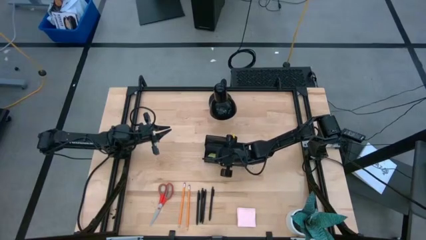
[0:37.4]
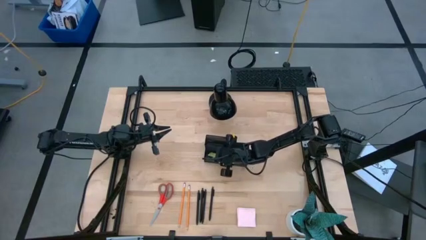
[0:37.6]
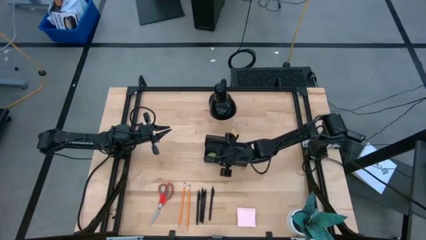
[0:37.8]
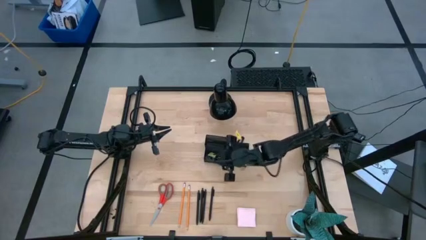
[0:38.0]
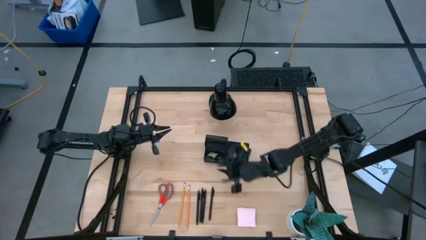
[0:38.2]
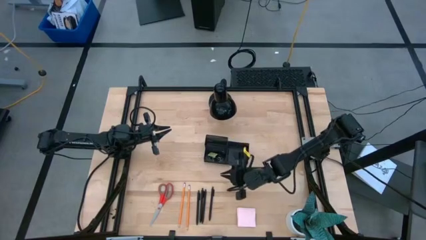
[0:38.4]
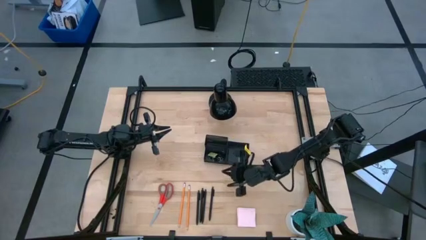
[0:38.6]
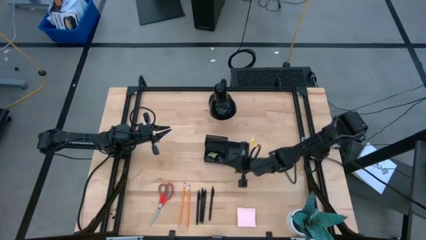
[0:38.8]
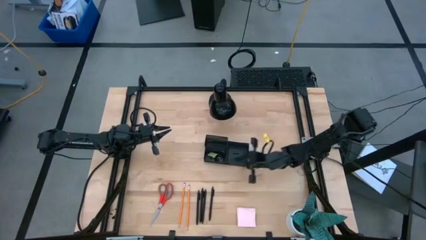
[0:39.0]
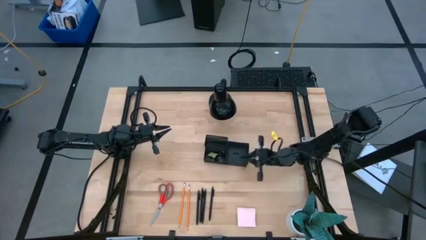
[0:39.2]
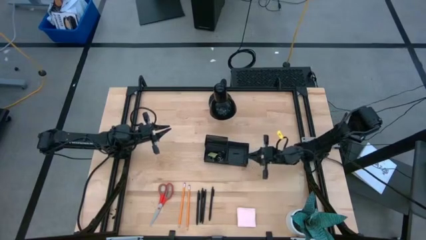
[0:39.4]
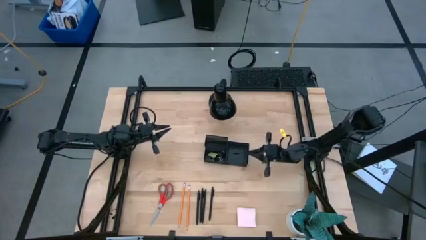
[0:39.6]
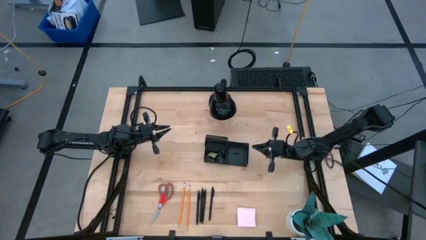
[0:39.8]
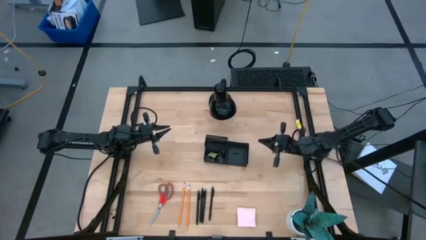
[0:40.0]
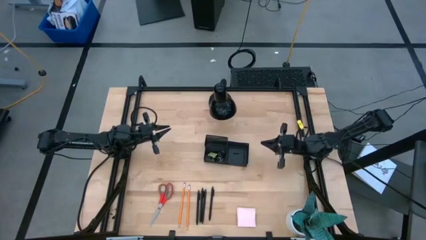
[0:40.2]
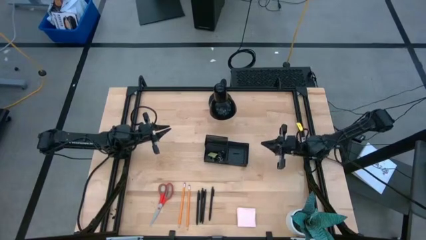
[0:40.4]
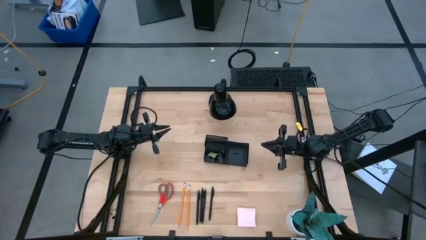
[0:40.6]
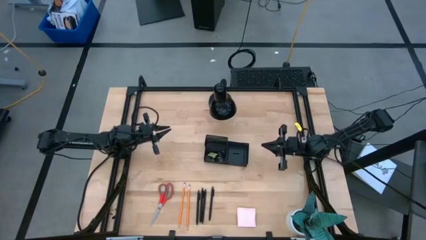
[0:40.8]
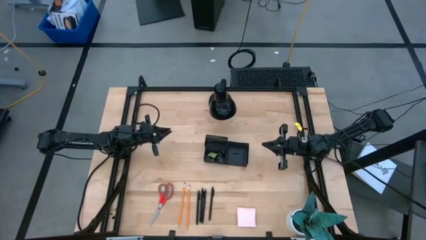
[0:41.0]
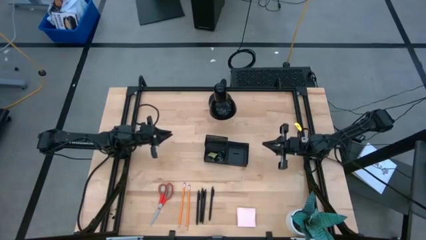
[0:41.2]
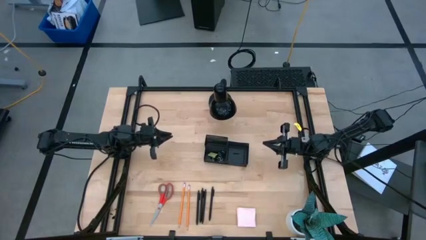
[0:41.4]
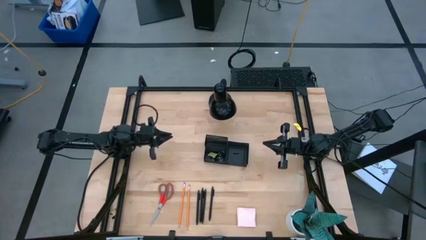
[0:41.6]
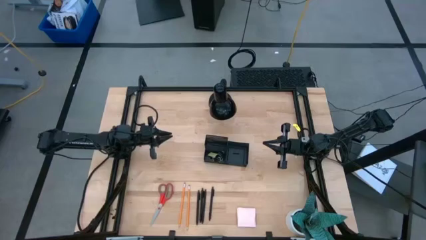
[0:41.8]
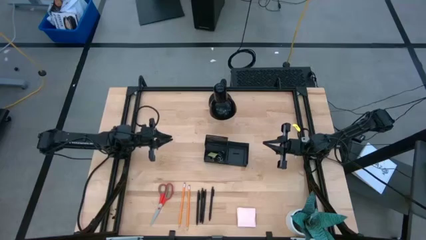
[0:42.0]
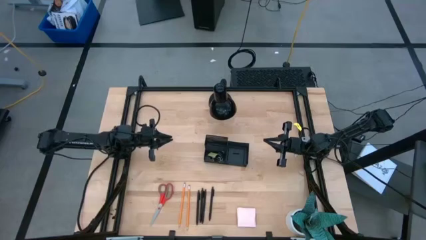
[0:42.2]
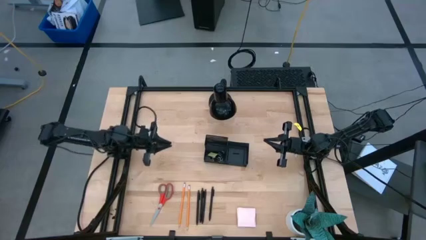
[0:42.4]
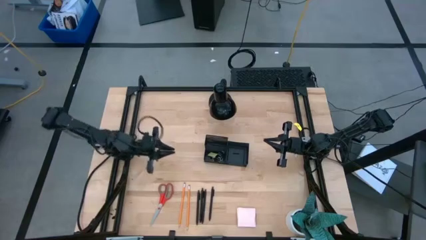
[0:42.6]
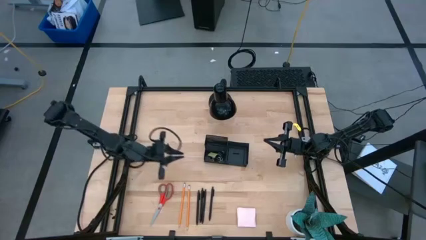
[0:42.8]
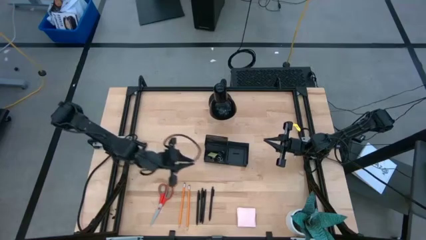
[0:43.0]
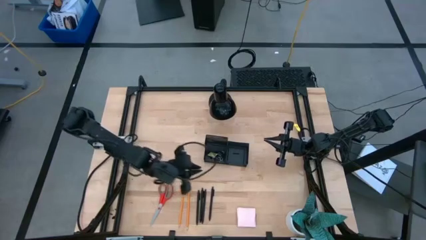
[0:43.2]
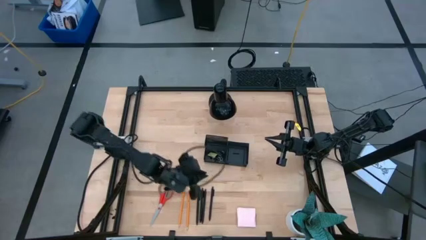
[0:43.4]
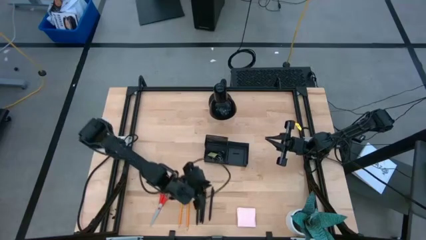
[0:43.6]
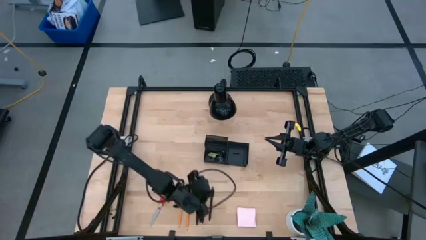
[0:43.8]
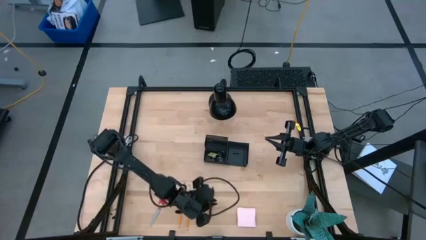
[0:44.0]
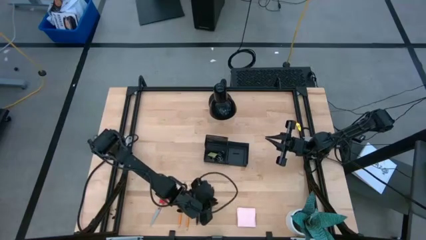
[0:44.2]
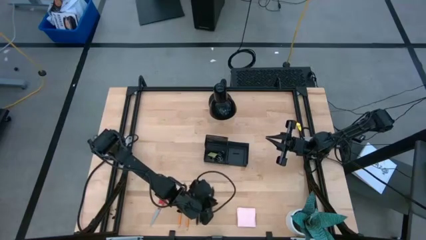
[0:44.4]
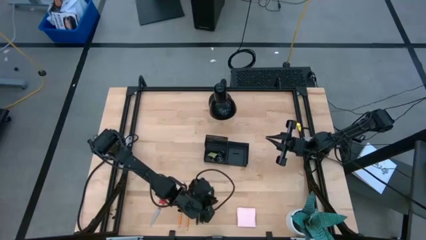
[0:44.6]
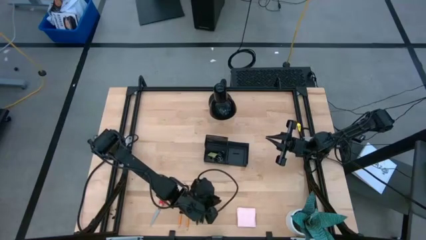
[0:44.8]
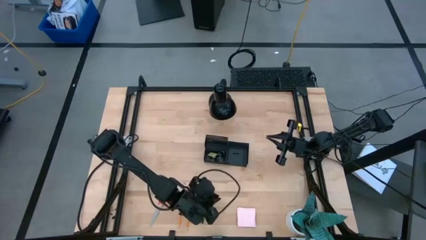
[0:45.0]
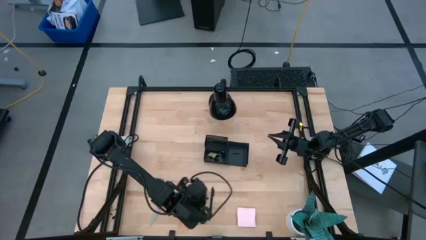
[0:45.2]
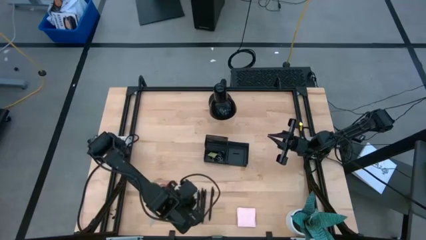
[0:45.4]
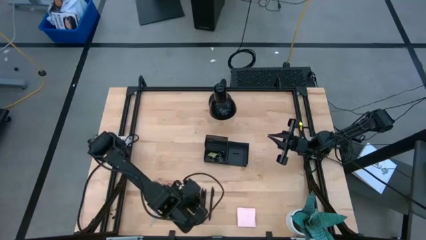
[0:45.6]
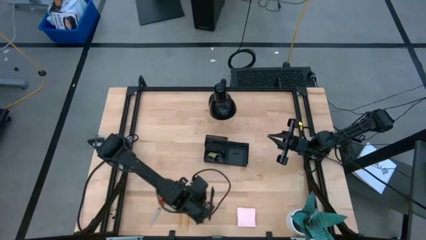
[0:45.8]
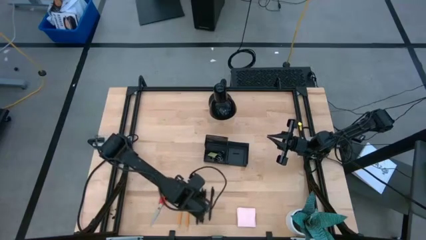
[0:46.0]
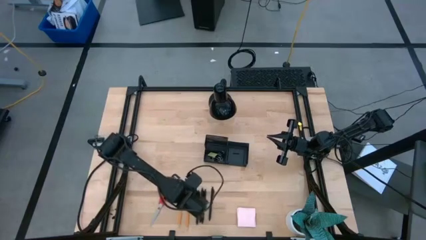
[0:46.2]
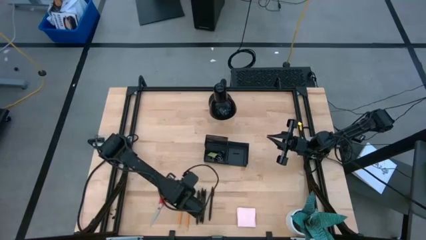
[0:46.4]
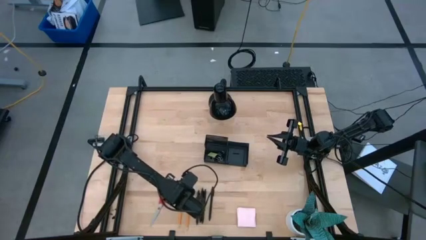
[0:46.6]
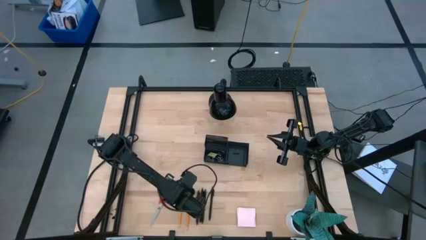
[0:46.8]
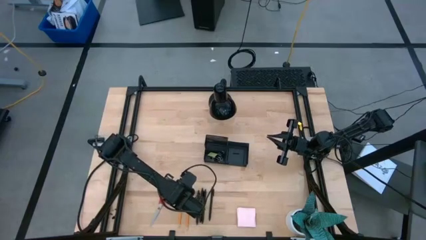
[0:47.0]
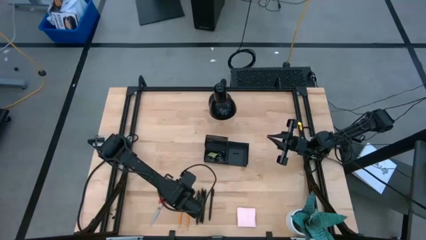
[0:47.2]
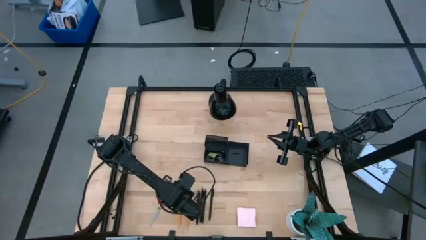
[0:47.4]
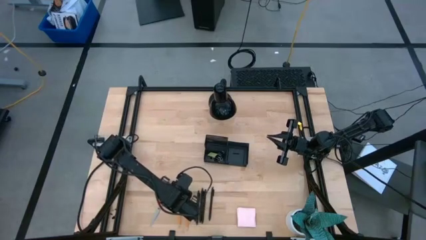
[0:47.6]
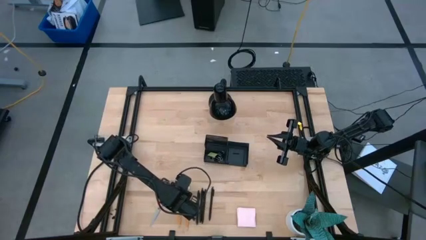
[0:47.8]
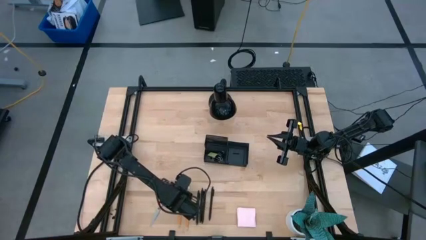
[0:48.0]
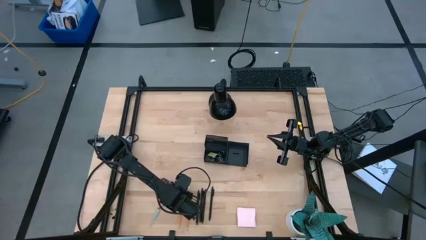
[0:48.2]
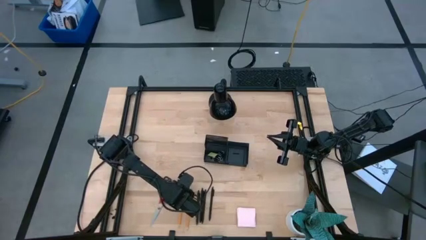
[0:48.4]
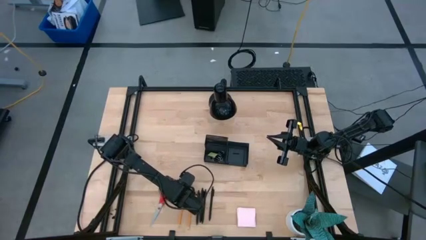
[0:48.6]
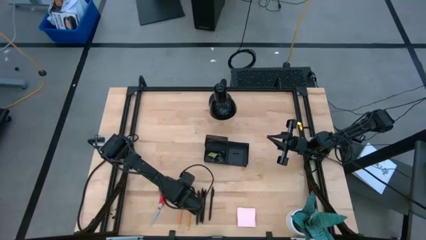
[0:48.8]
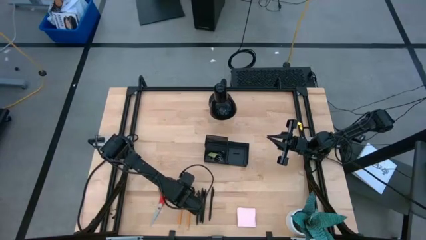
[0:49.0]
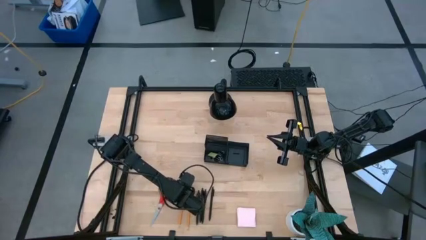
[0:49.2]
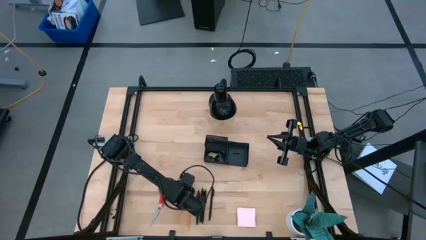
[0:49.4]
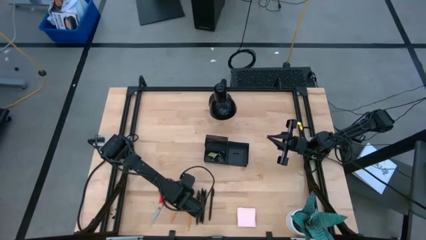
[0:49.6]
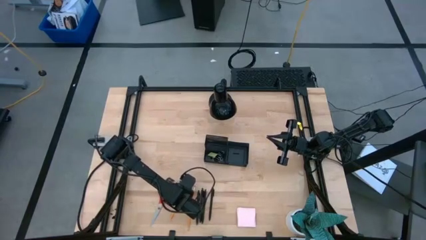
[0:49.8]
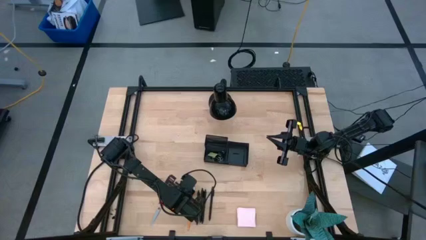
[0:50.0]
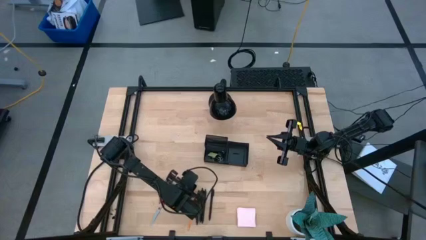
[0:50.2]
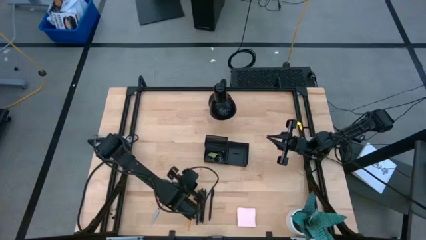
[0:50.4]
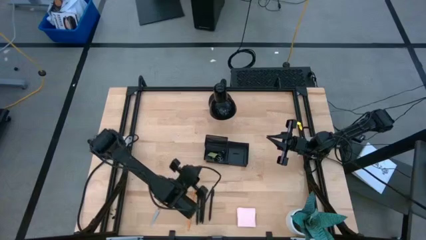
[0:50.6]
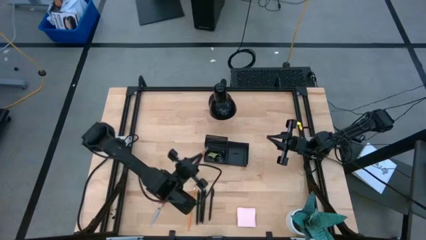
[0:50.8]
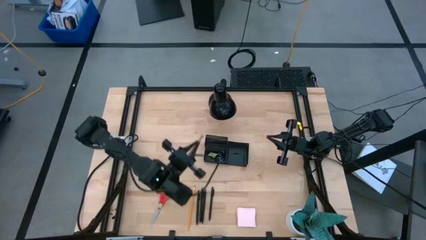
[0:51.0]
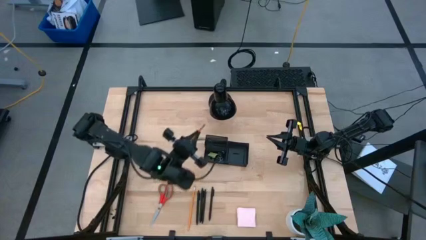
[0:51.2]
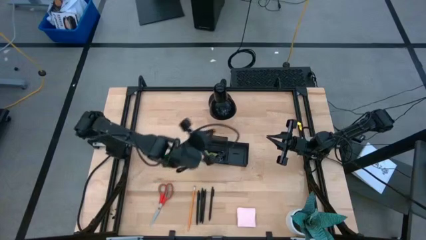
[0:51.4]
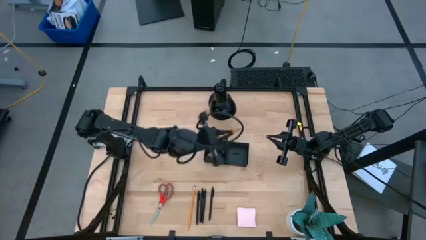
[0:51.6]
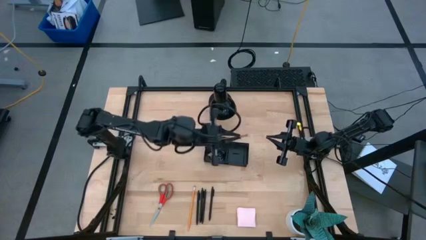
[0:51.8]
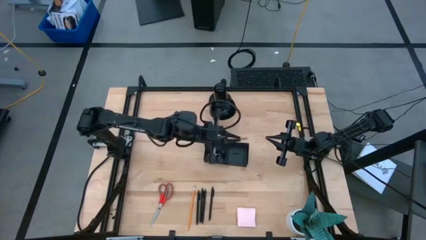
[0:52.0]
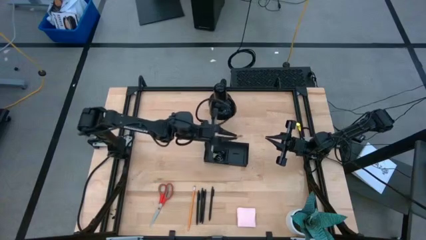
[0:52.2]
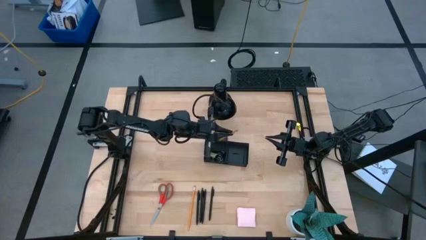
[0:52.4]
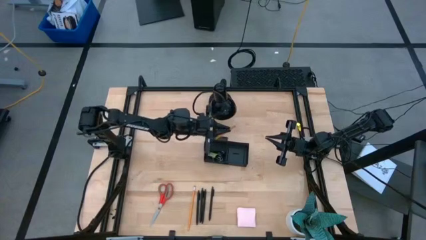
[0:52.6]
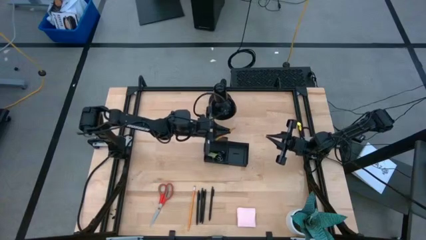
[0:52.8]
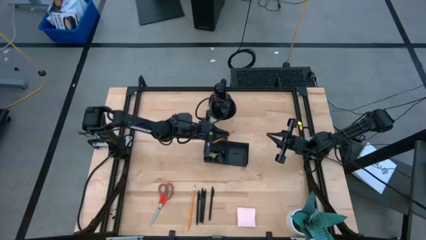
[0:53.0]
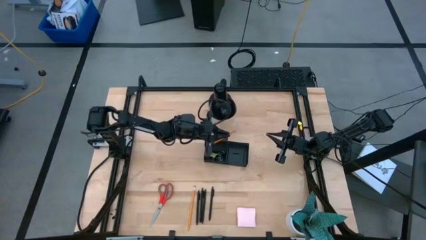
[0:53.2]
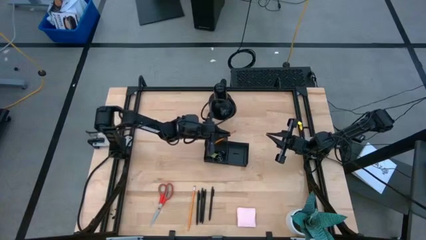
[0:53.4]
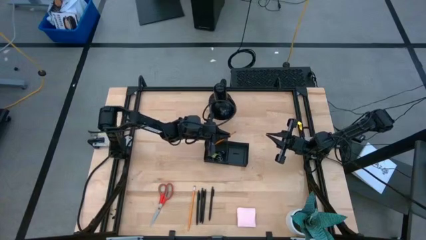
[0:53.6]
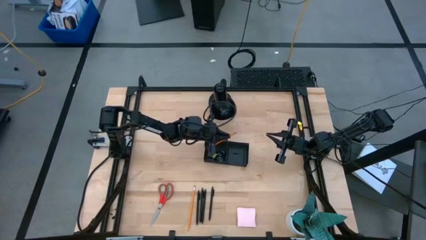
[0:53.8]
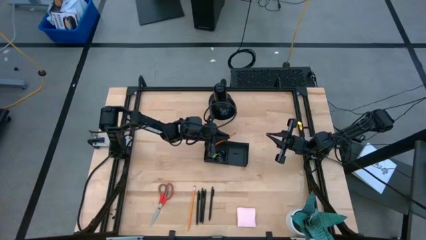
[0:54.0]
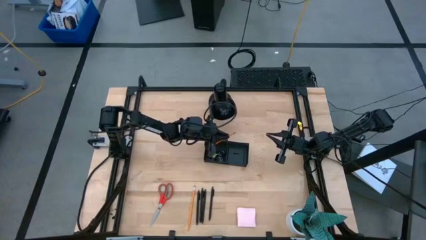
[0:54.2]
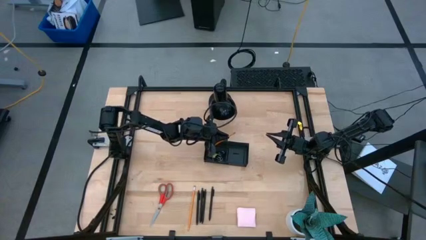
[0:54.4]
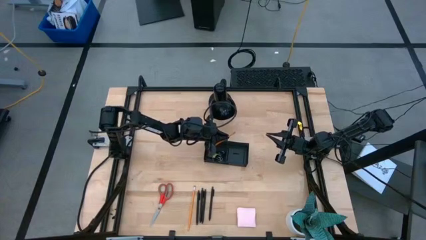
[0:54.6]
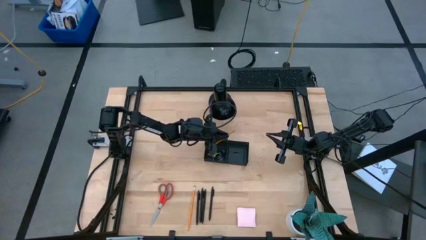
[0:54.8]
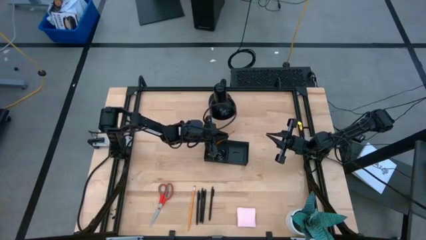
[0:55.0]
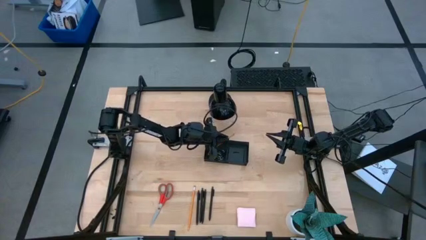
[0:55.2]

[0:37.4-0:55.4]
Task: Pick and place office supplies into organizer
Put the yellow pencil into the black desk organizer
